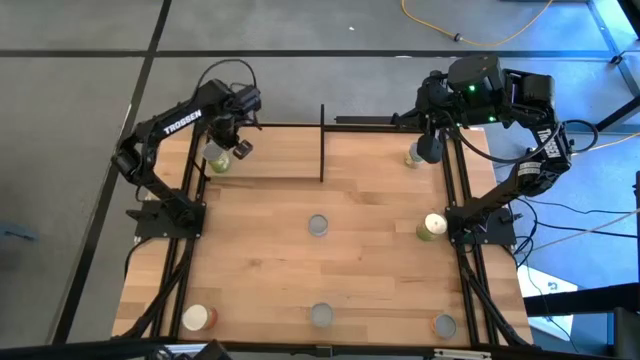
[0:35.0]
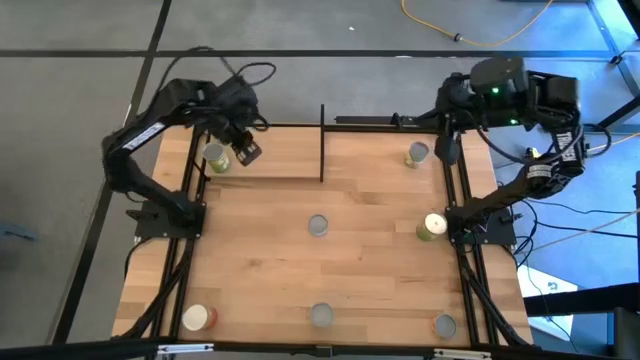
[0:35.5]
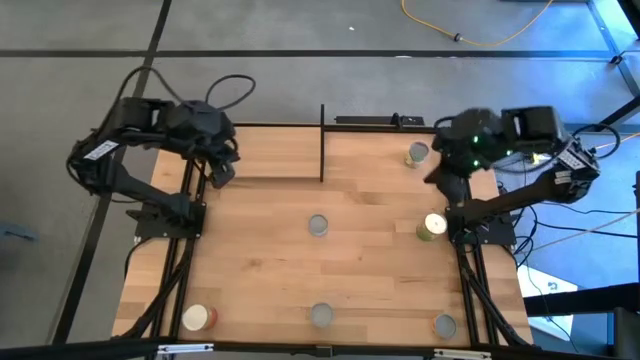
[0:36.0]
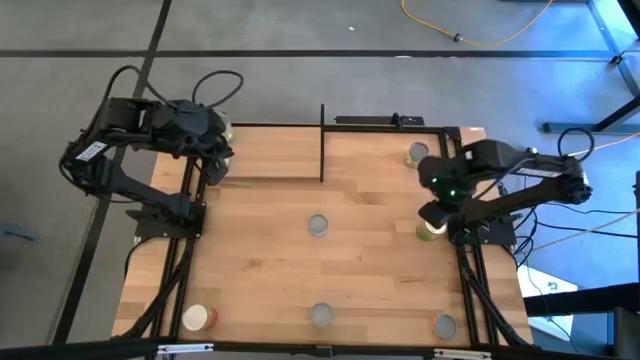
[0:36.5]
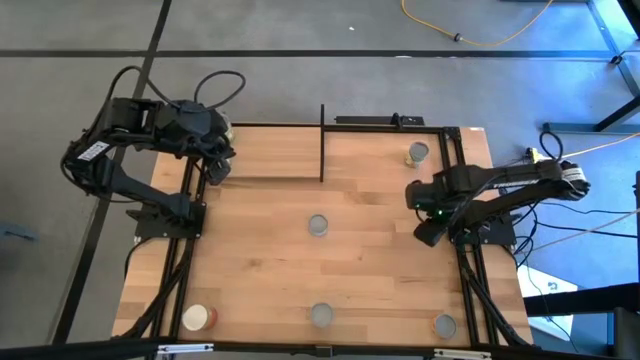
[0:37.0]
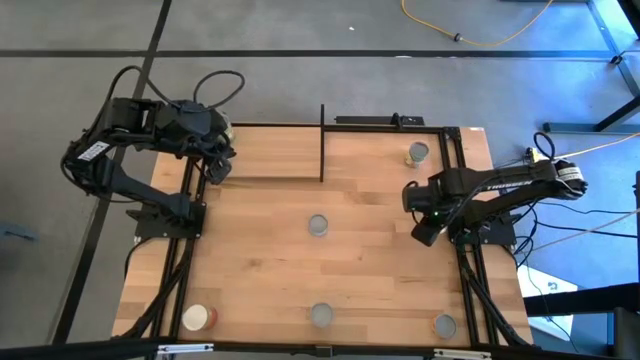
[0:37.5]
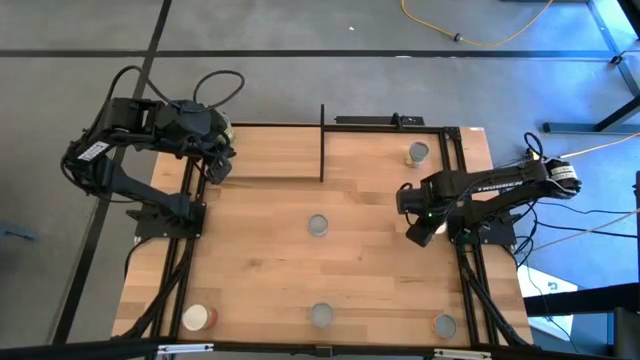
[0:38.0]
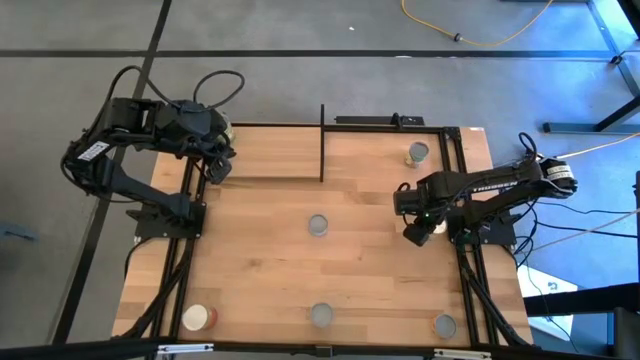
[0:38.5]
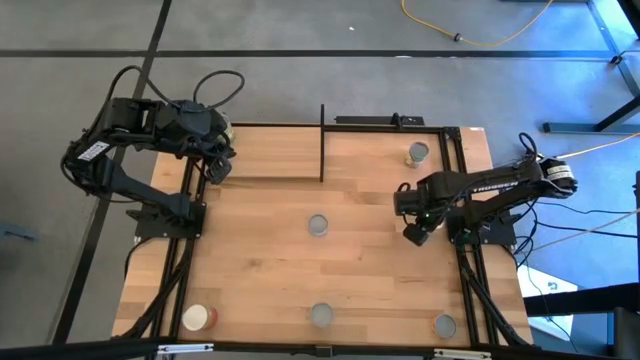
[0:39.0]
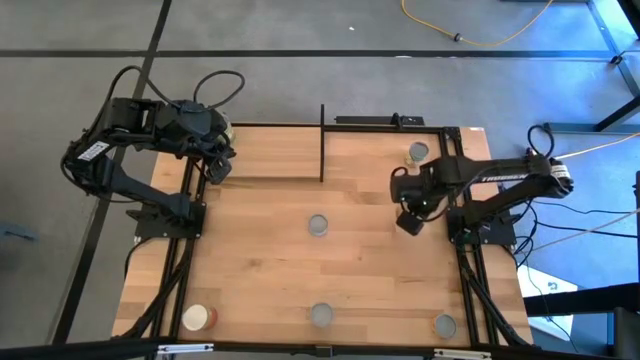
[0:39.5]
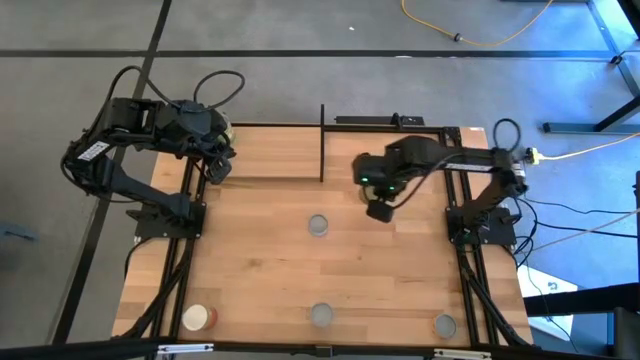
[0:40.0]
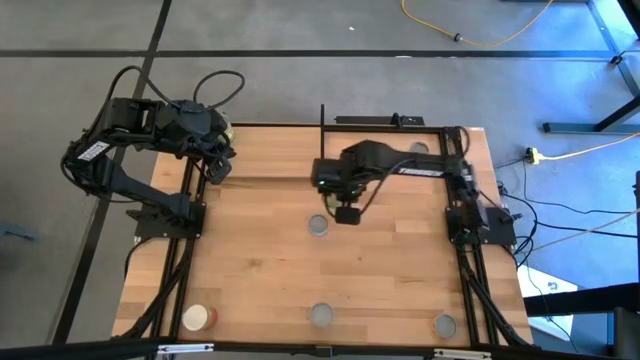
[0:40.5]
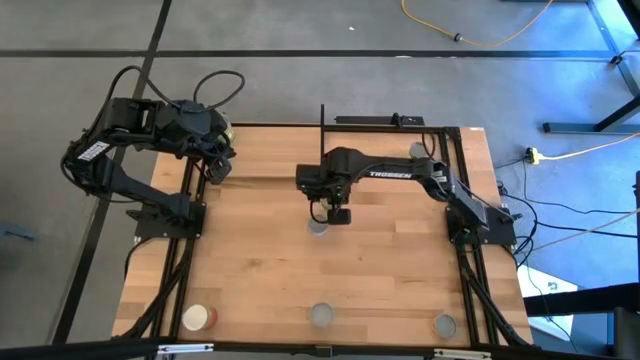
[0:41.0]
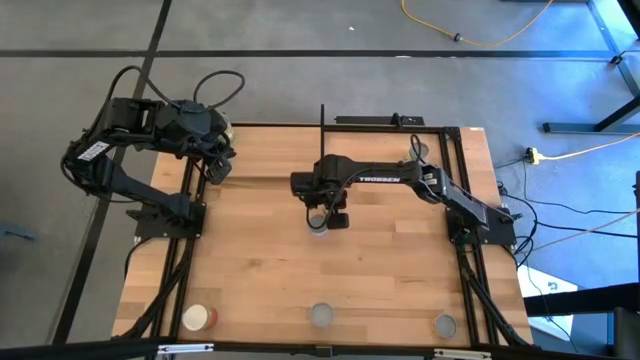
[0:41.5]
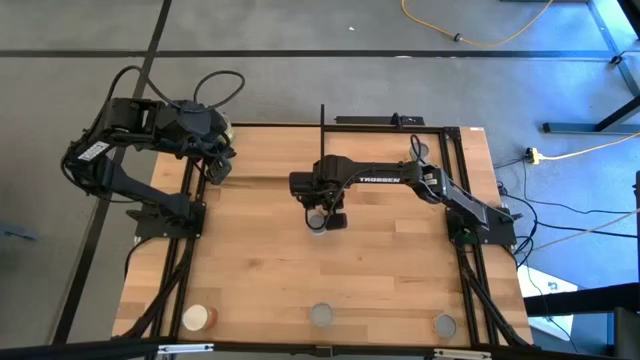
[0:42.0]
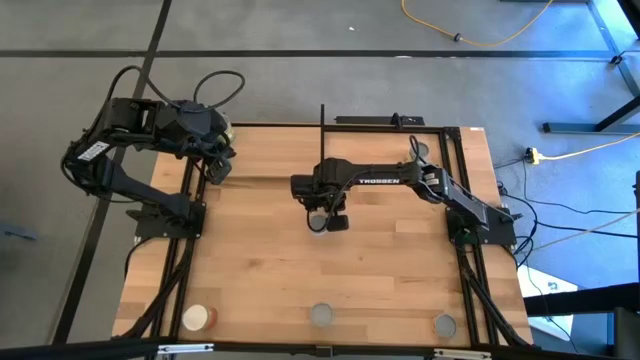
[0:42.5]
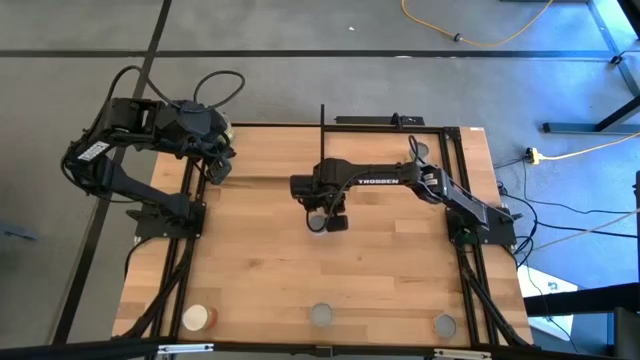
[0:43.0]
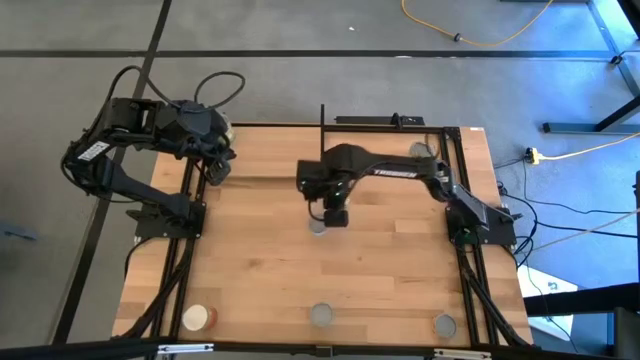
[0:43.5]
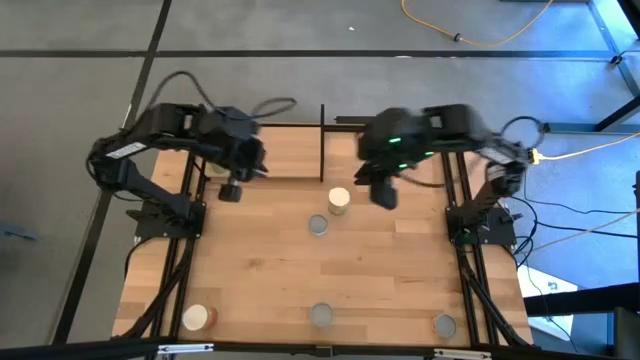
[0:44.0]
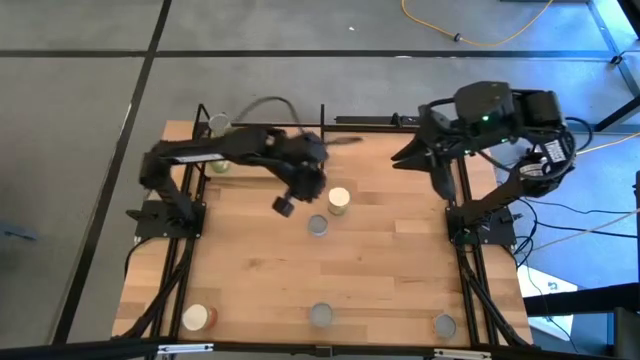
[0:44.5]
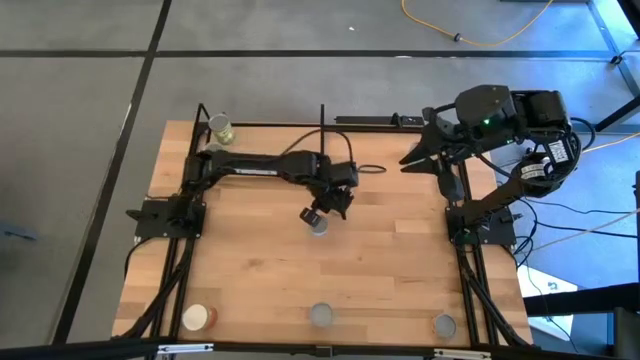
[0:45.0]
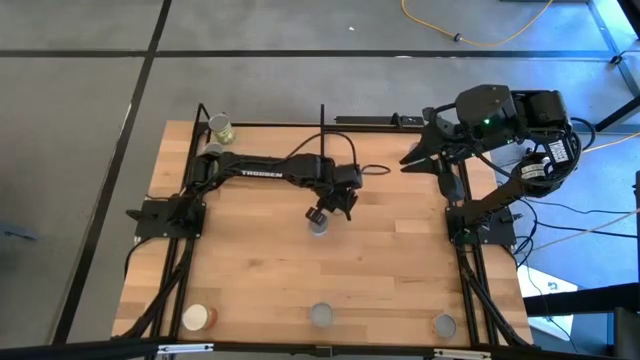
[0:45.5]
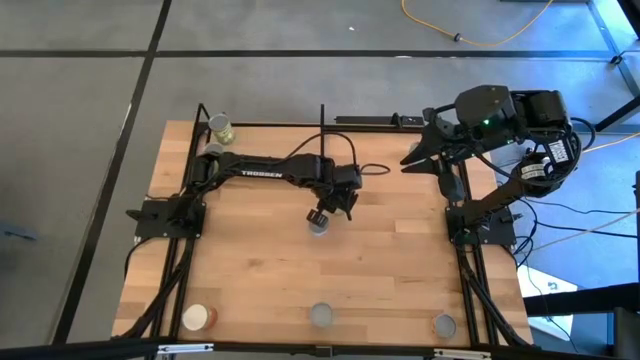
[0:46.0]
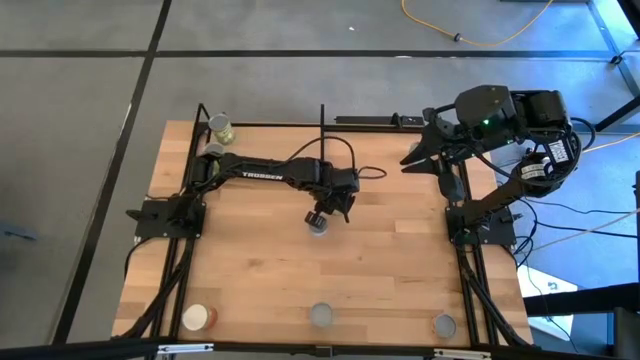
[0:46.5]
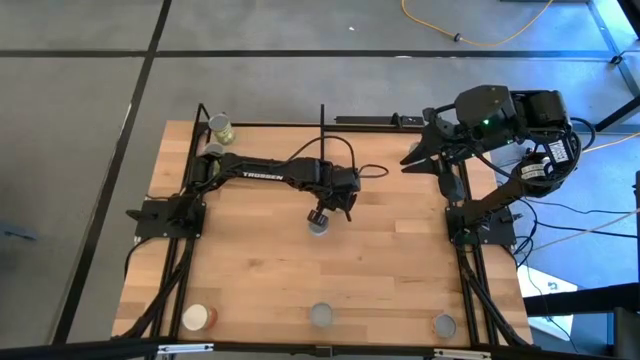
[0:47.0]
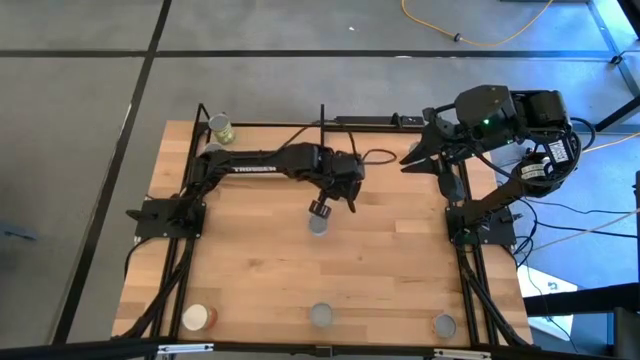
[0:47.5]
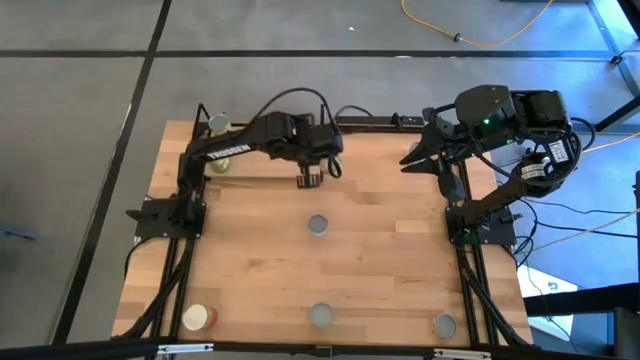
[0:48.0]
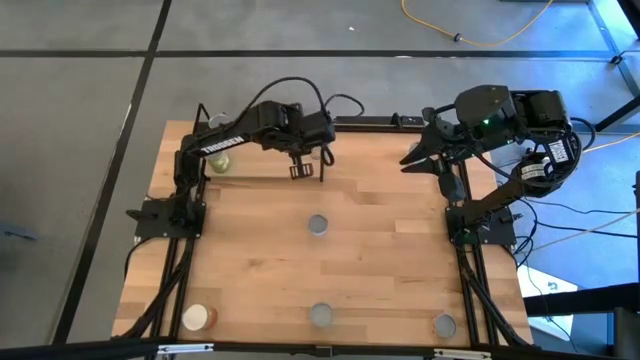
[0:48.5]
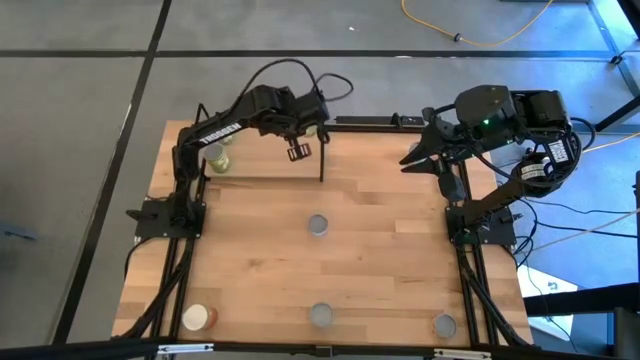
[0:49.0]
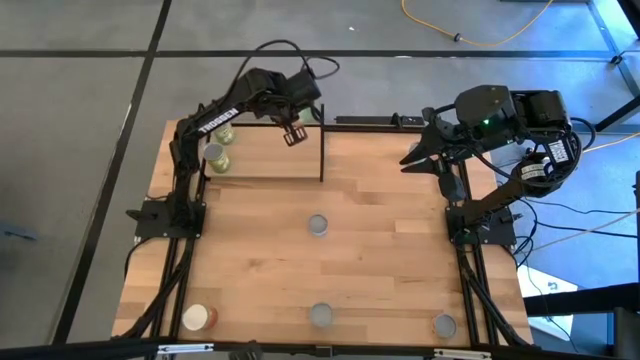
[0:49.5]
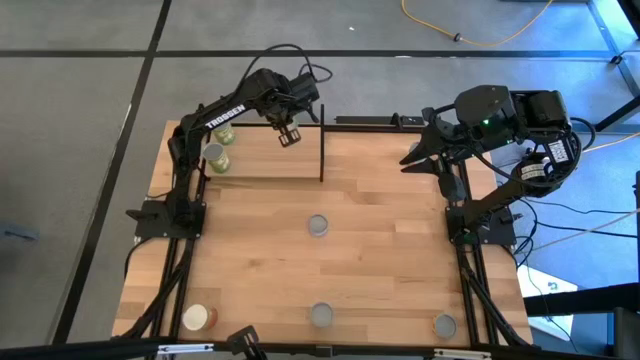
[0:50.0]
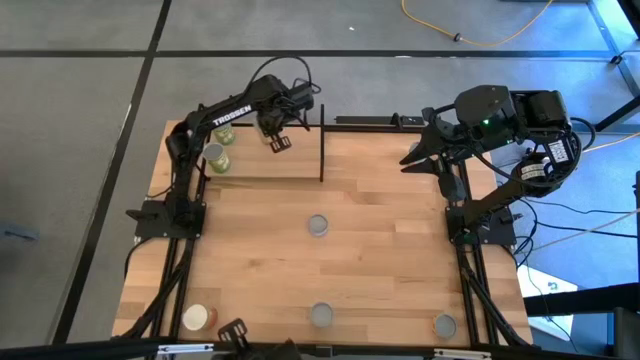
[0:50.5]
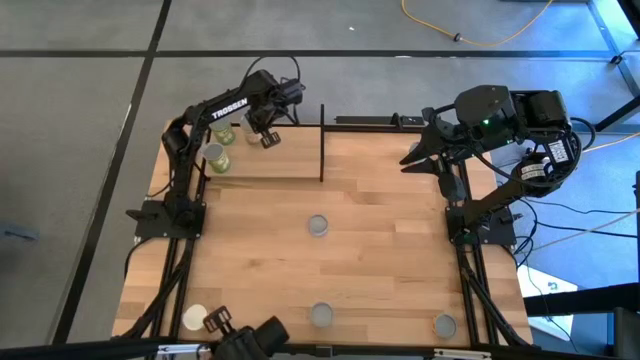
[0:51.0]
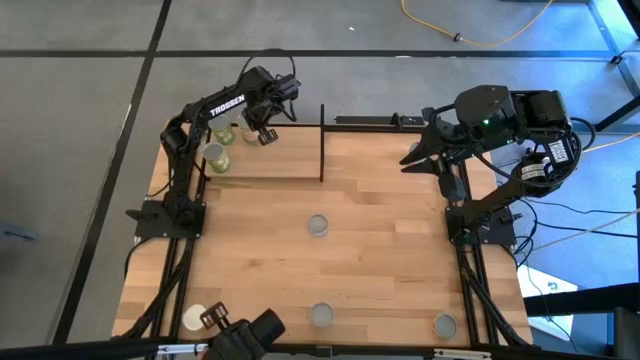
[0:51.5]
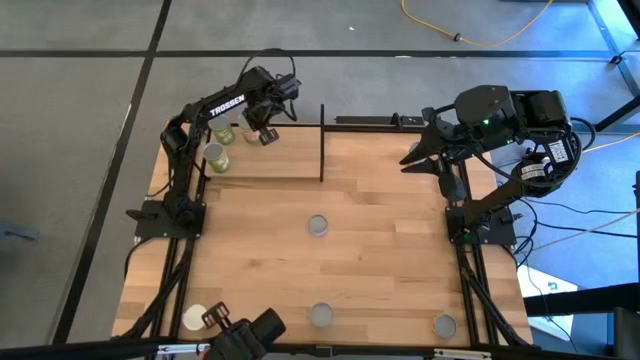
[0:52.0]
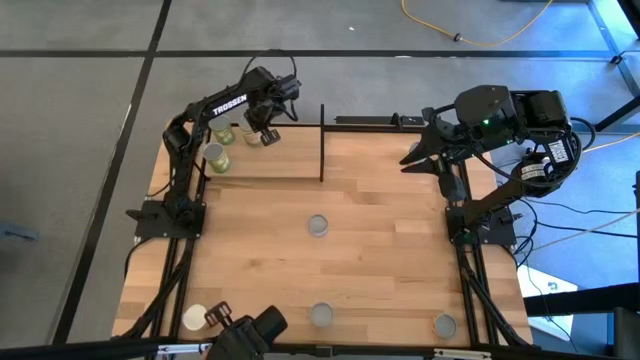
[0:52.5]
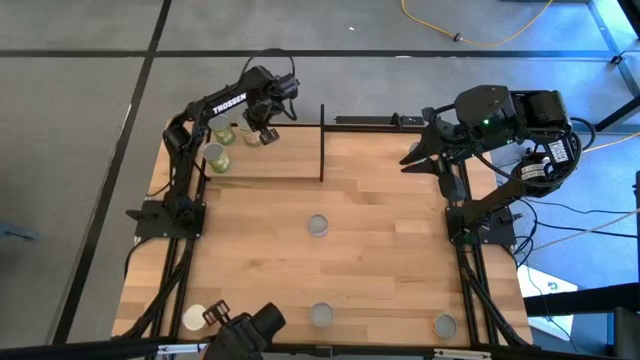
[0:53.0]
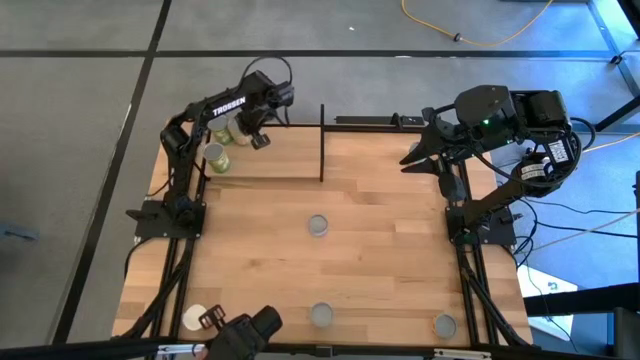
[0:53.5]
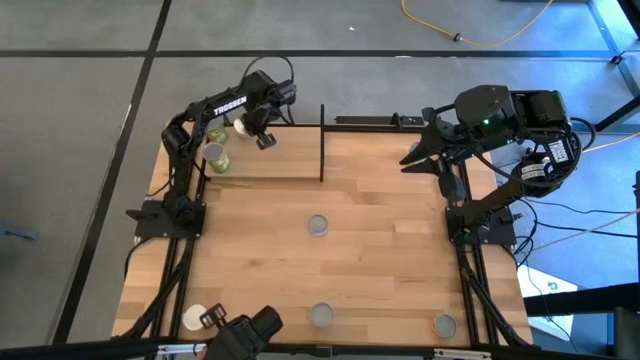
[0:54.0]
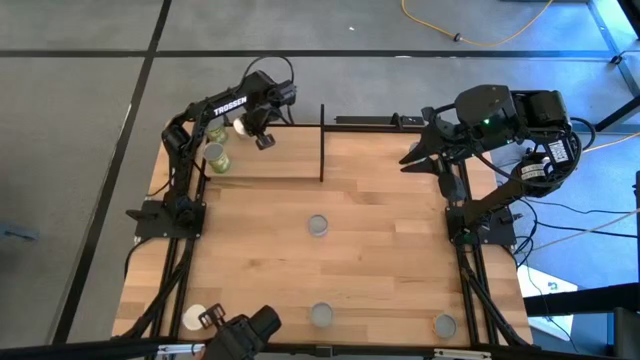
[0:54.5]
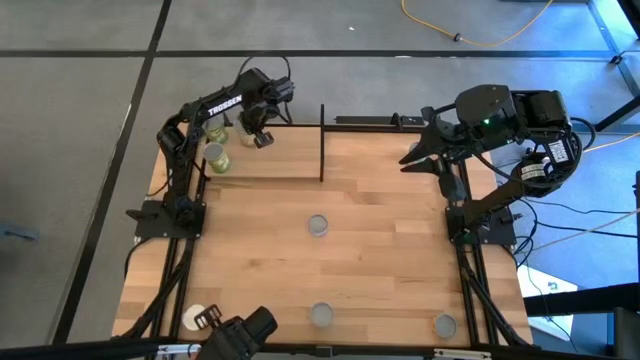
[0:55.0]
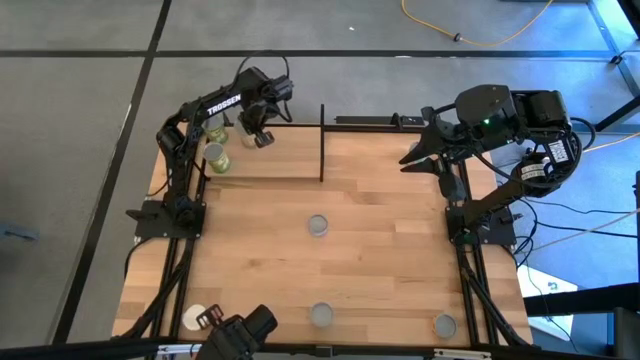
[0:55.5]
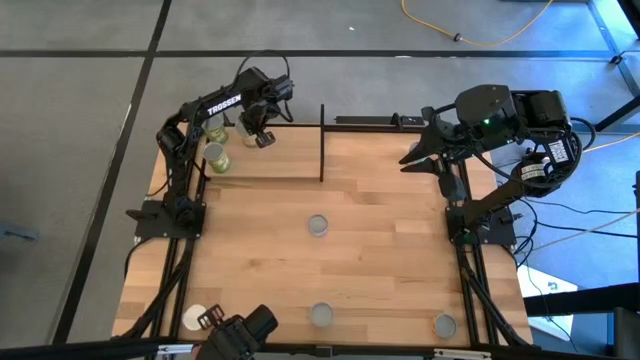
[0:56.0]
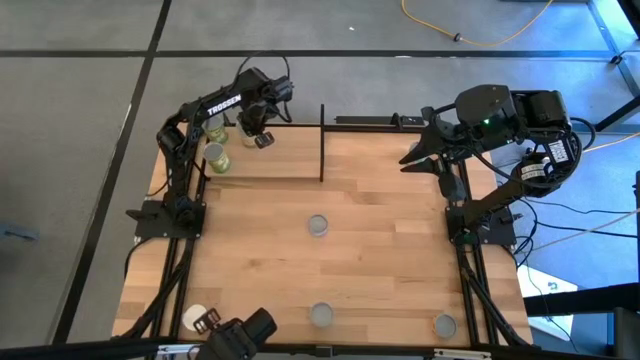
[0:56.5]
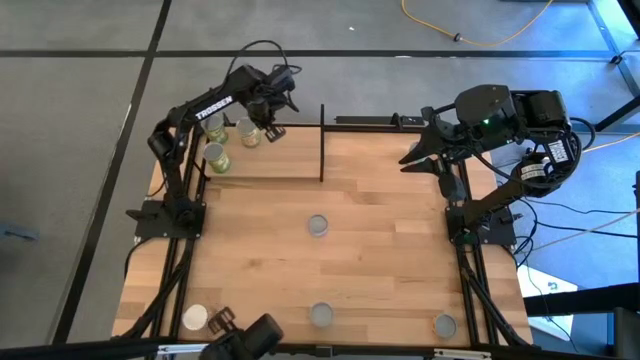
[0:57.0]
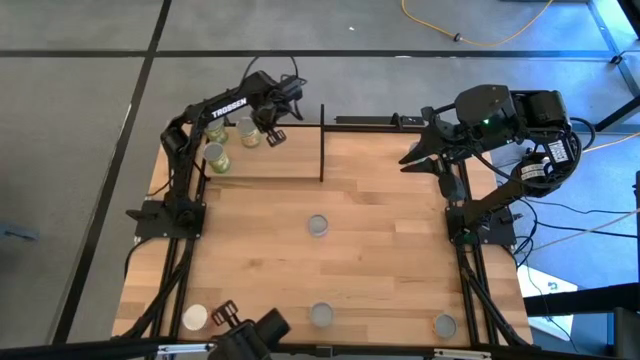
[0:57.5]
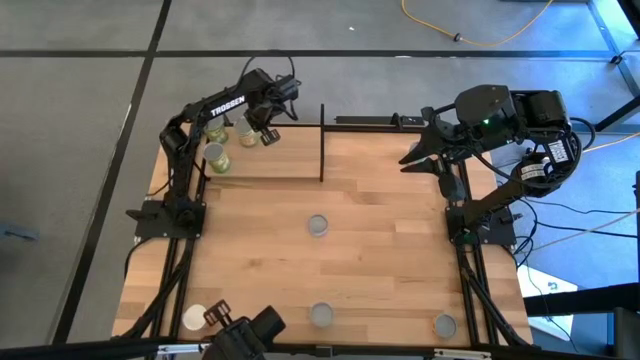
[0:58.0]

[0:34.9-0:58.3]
Task: Pick and place cans onto a shelf
Put the canned oranges on the shelf
